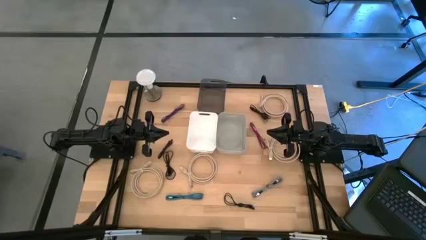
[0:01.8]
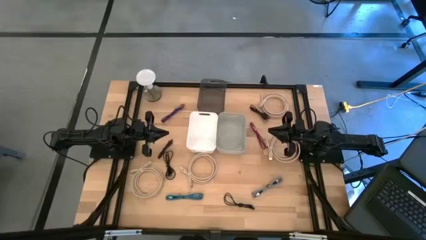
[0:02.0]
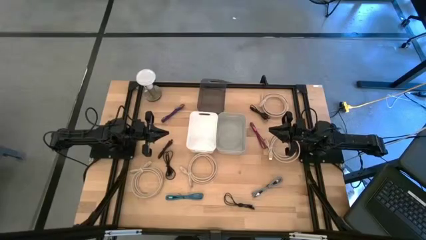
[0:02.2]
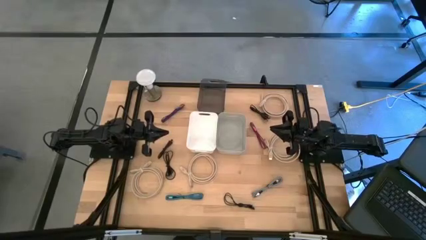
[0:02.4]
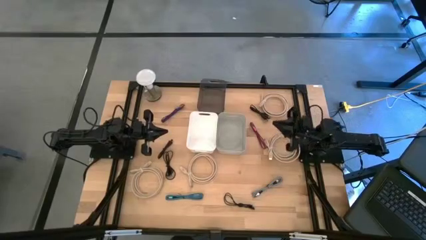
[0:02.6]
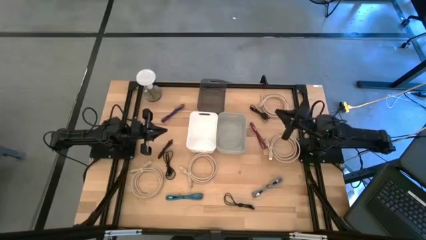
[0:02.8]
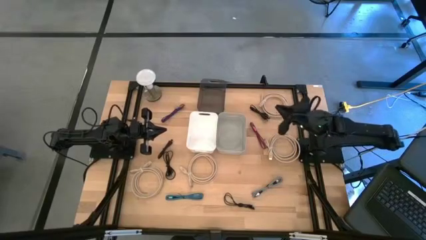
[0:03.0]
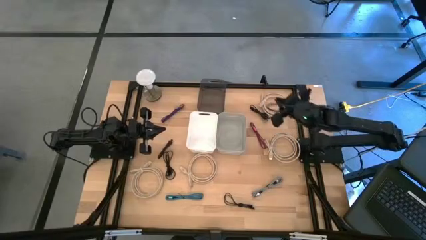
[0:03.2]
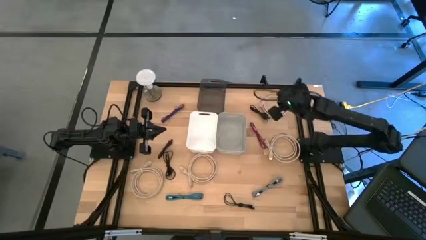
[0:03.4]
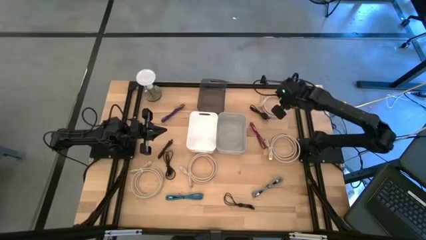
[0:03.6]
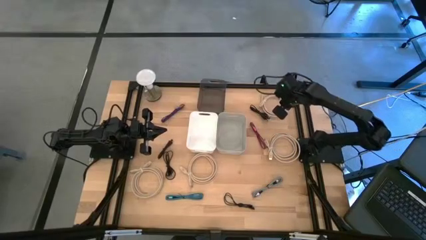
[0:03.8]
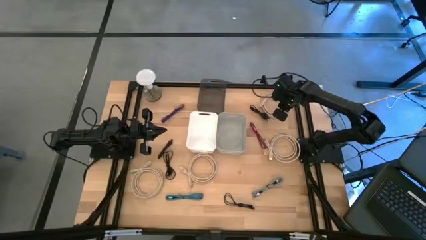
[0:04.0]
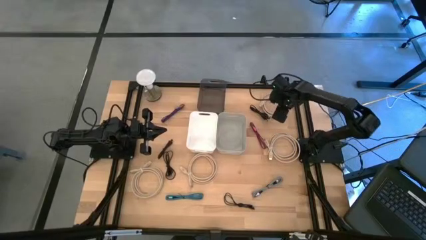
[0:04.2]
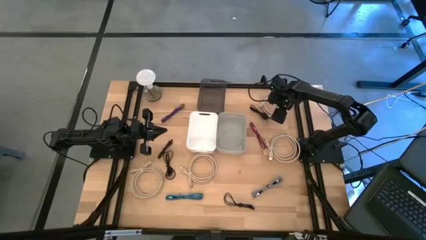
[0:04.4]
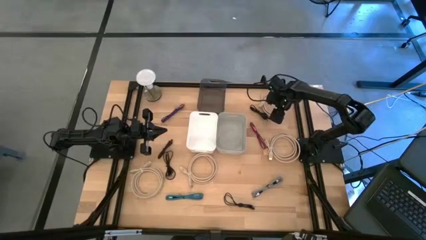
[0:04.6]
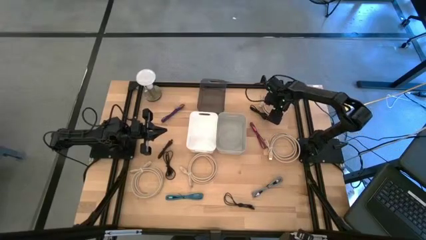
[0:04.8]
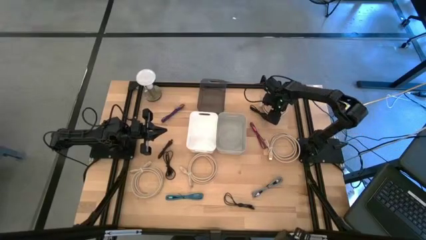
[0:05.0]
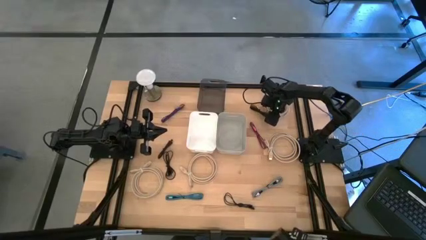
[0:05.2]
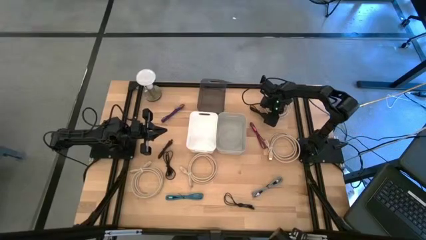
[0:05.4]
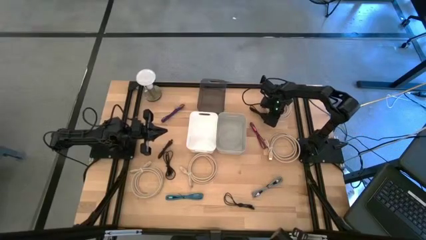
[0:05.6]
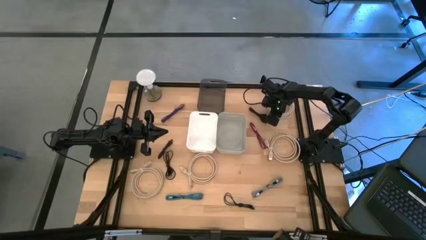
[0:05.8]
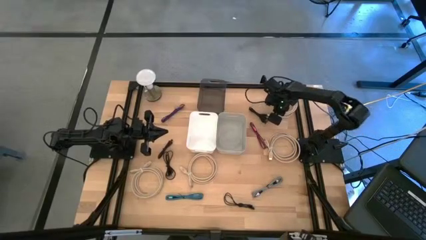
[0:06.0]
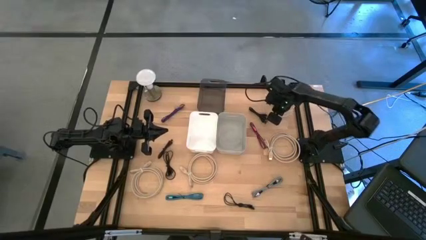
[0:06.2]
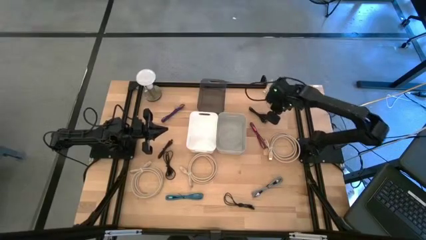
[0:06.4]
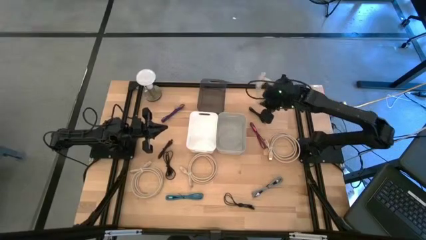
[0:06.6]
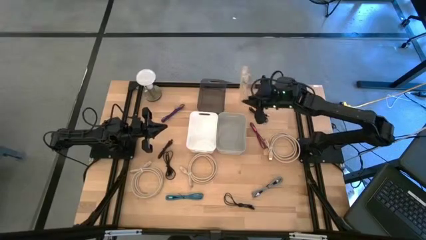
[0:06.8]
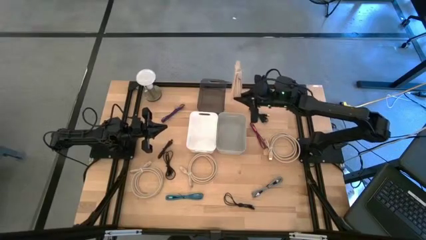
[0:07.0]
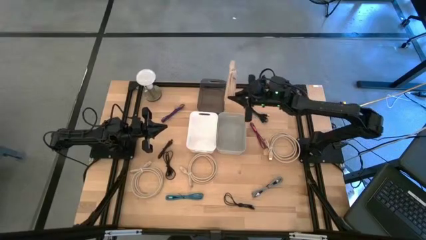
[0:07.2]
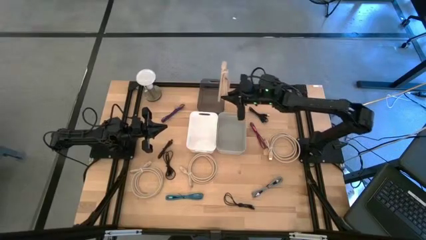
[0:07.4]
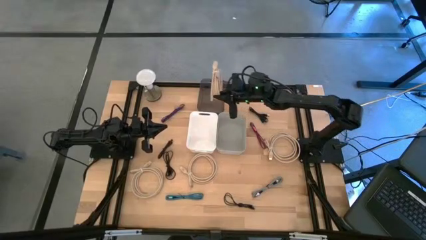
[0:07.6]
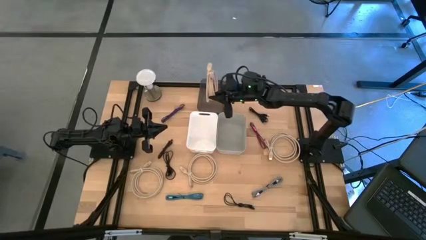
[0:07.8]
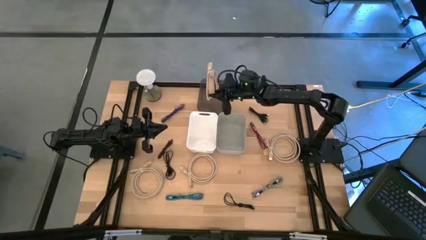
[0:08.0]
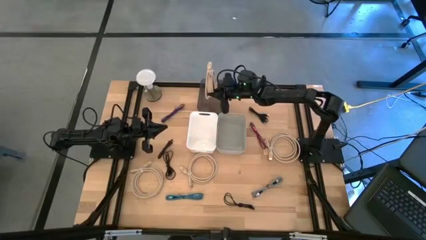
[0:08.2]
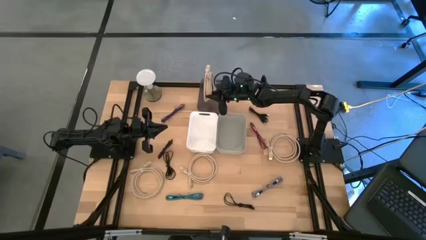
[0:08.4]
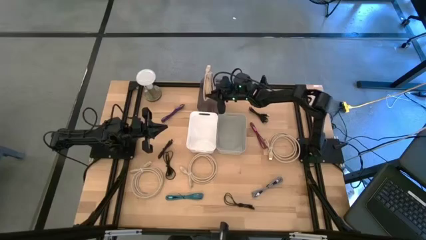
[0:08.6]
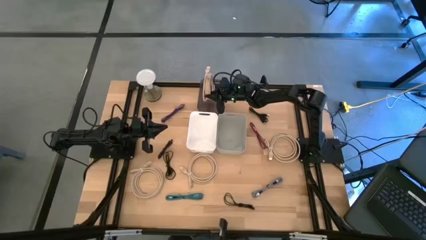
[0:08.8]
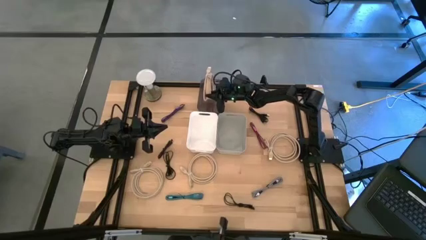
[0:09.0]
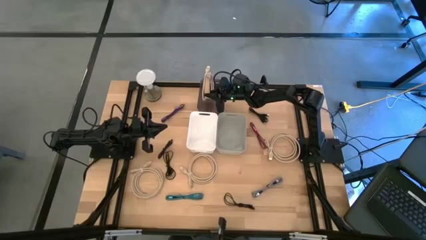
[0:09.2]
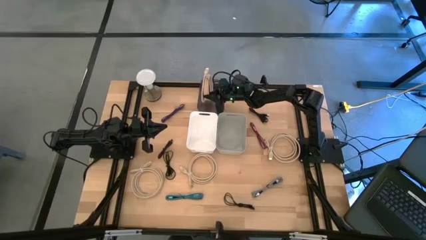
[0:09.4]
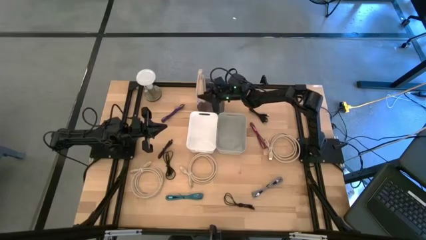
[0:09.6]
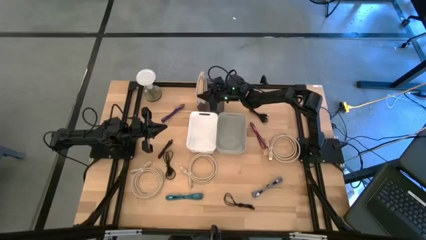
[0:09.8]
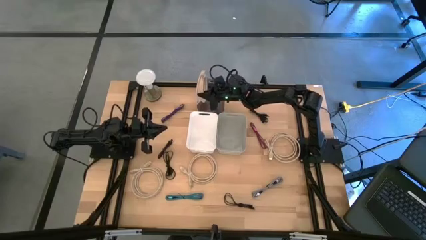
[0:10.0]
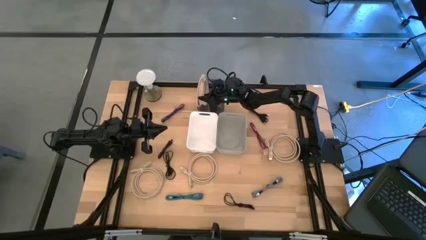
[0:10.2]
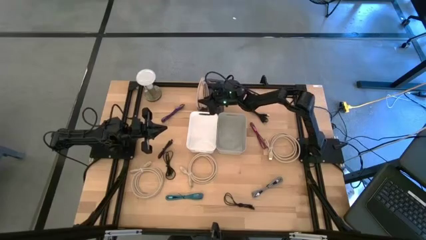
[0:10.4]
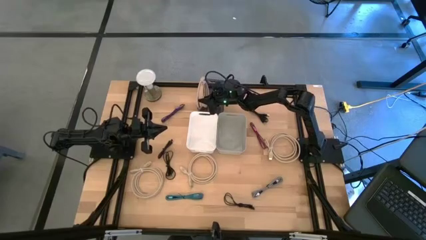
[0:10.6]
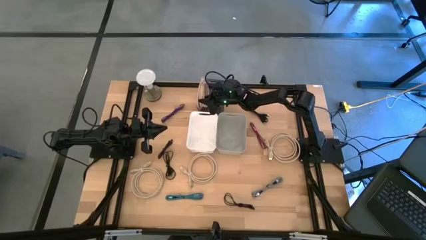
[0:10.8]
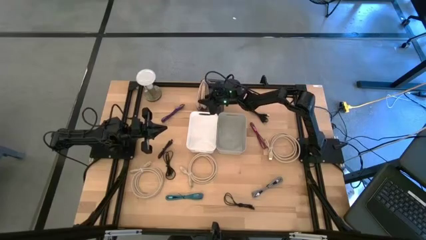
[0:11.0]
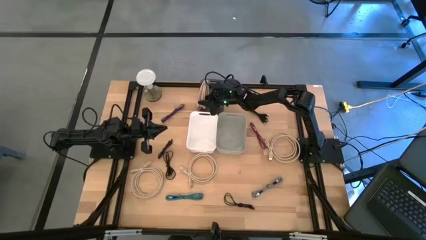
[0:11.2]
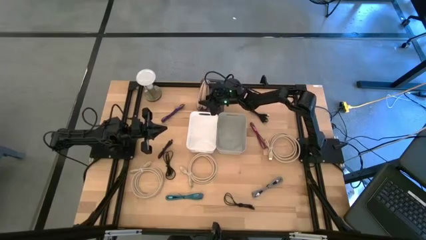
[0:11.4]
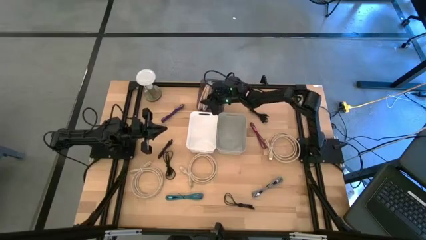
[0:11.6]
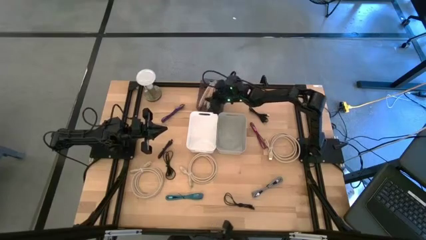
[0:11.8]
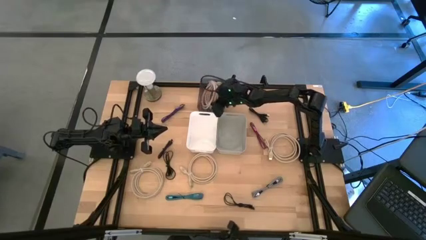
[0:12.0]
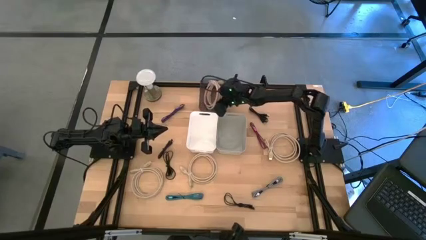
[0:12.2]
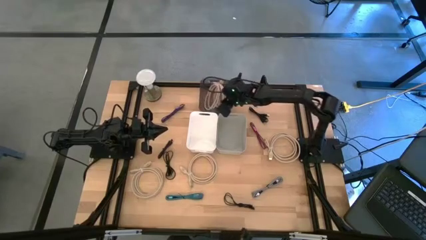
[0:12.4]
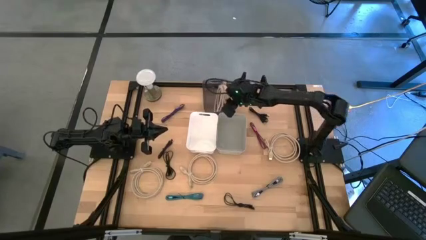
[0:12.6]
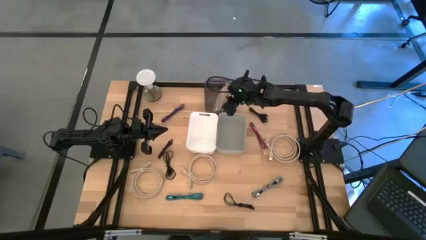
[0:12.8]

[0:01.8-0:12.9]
Task: Pick & Place USB Port
Put the brown HDMI cable into the black bin

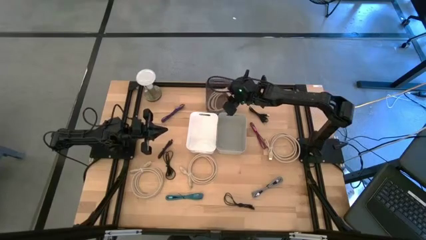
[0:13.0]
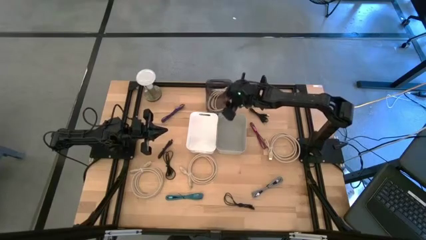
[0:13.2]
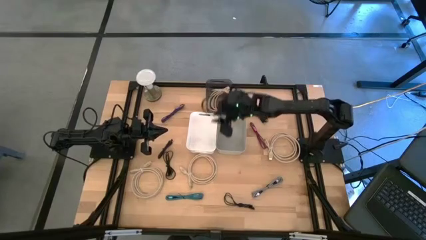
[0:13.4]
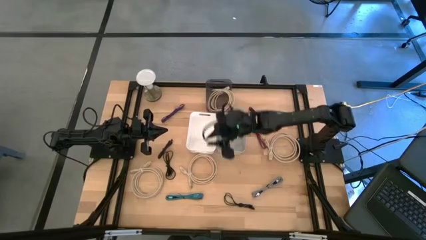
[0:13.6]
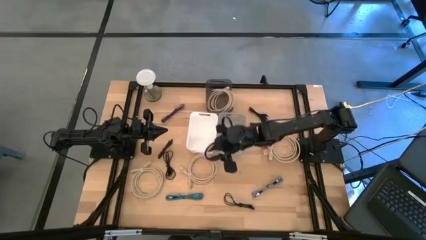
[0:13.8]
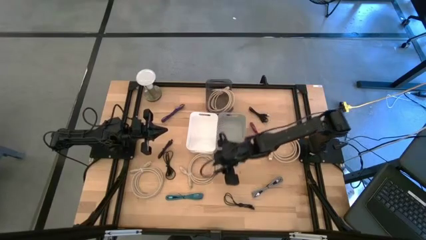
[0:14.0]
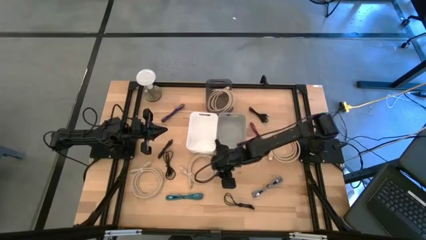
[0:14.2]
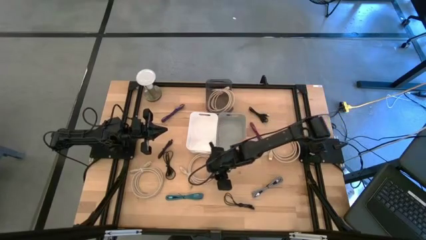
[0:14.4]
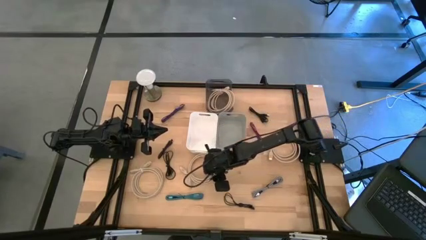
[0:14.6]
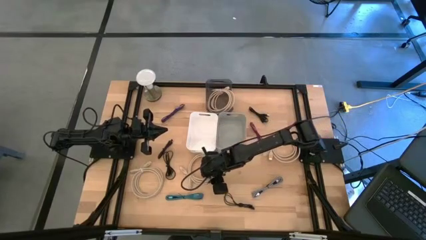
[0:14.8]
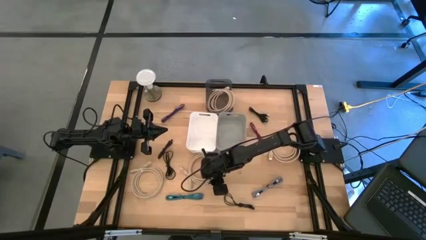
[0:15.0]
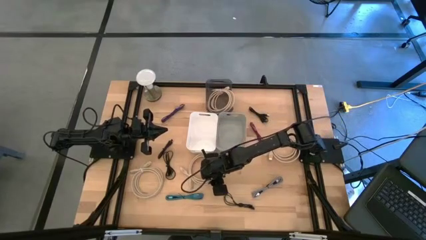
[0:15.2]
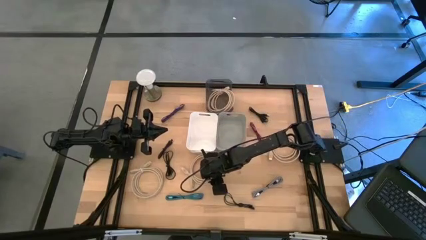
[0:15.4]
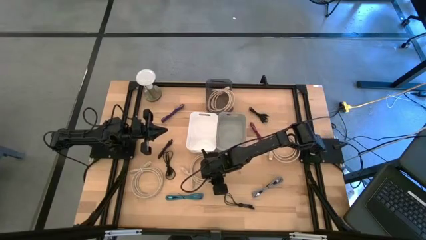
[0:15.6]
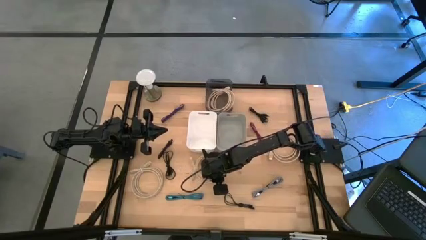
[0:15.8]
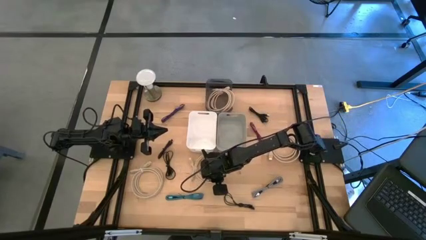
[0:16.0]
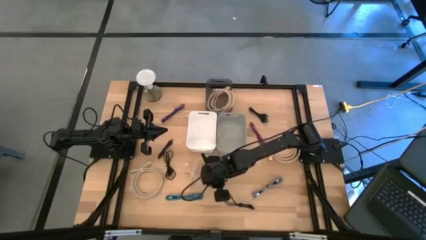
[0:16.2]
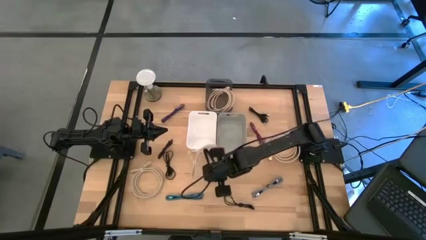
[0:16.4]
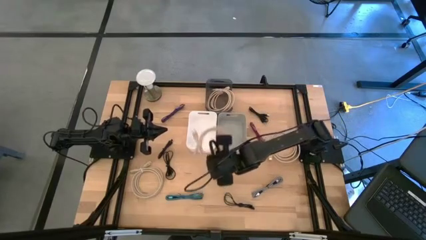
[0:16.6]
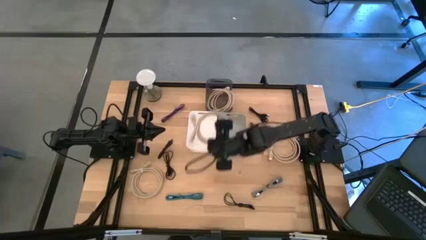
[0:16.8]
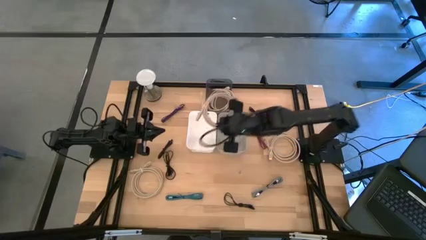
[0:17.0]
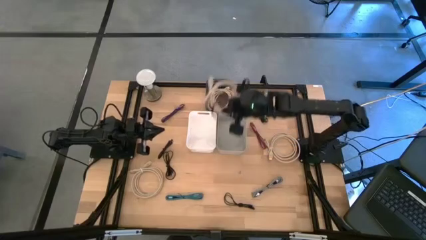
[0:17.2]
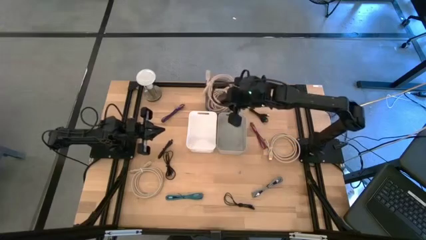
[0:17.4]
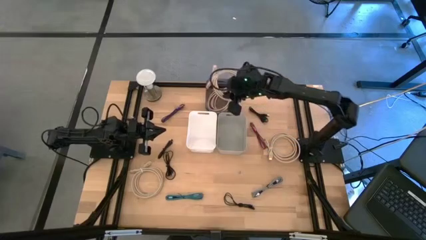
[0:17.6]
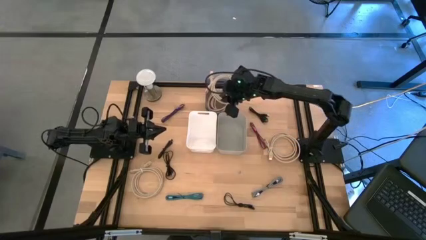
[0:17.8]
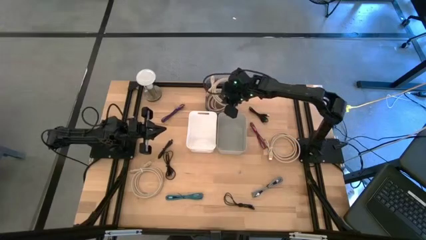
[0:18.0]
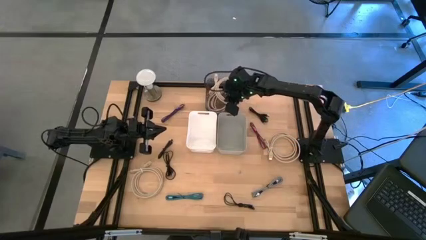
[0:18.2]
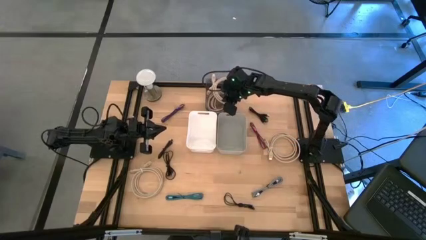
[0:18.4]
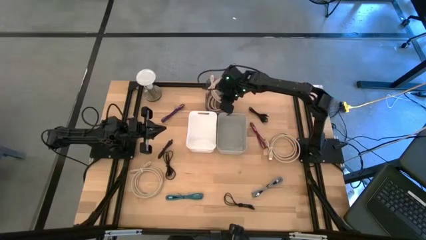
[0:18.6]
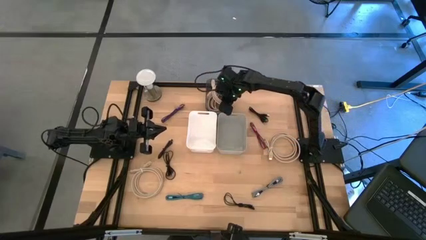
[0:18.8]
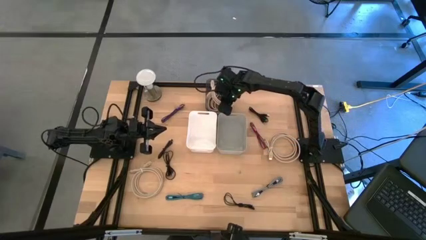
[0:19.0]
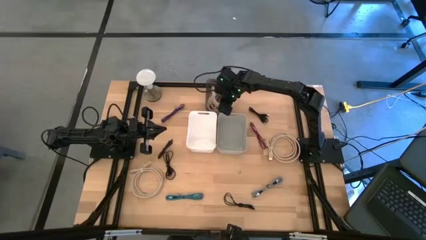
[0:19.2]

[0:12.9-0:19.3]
Put the brown HDMI cable into the black bin
